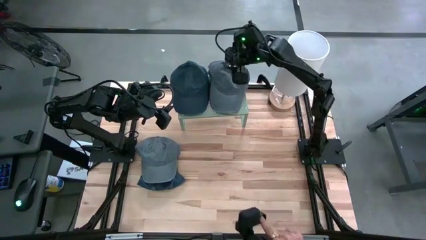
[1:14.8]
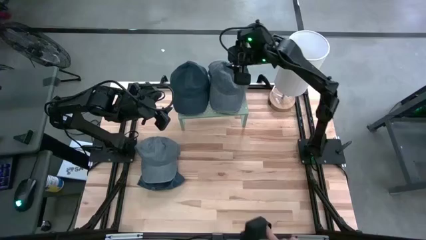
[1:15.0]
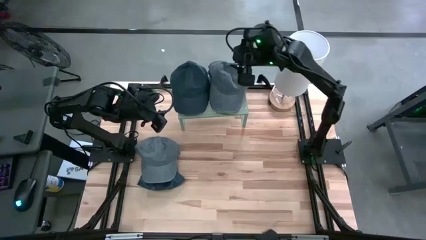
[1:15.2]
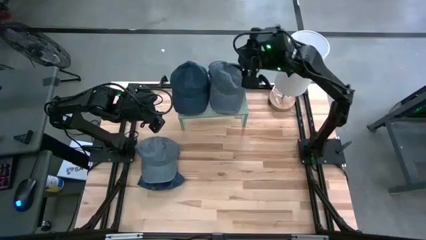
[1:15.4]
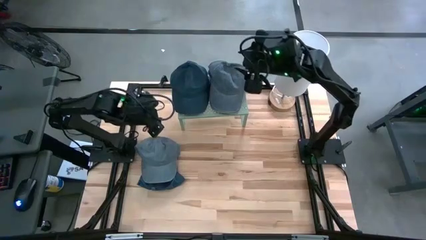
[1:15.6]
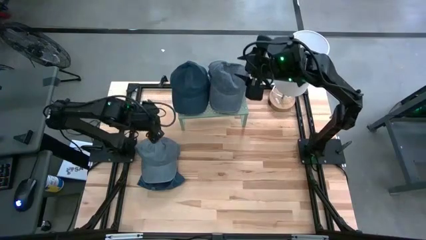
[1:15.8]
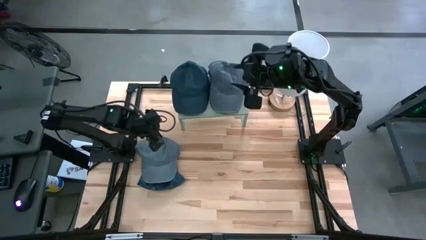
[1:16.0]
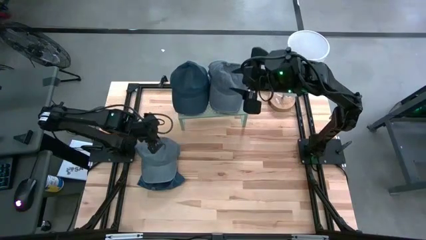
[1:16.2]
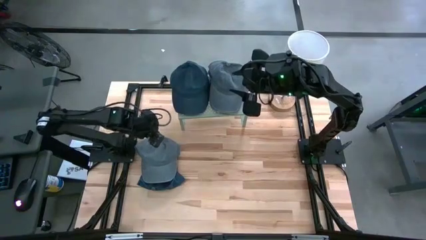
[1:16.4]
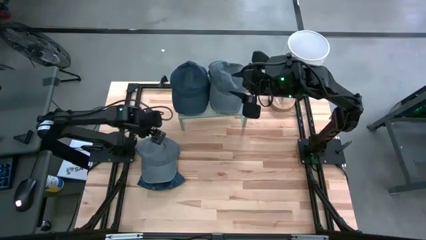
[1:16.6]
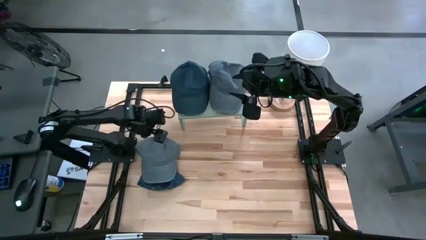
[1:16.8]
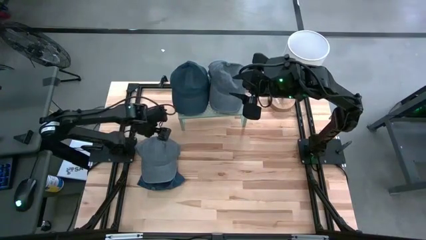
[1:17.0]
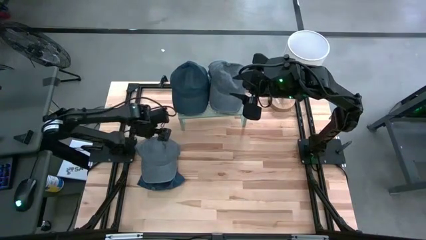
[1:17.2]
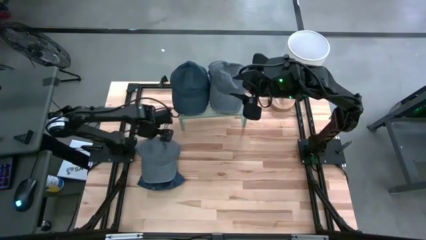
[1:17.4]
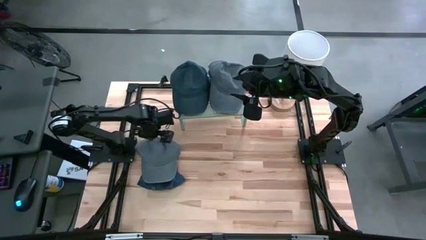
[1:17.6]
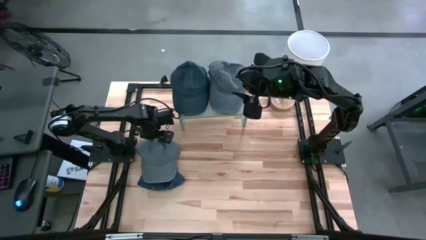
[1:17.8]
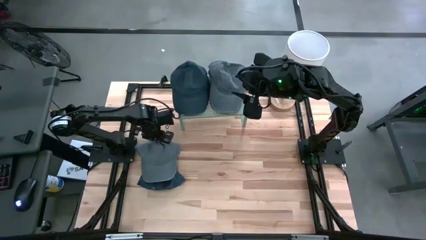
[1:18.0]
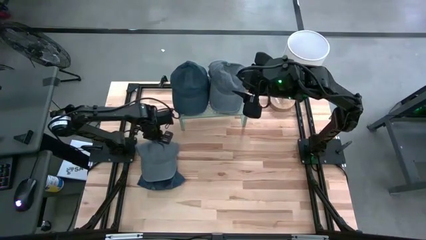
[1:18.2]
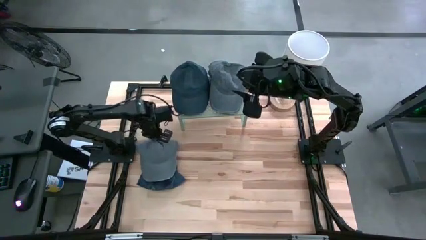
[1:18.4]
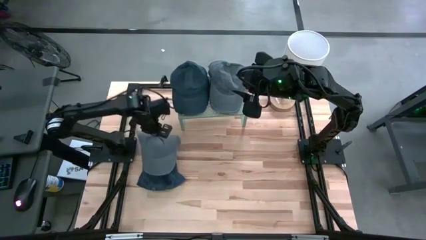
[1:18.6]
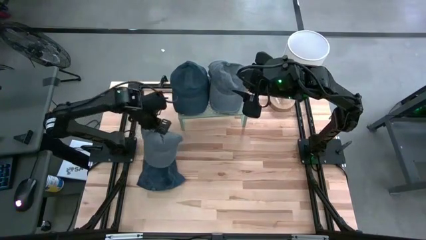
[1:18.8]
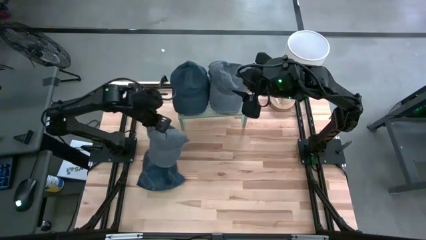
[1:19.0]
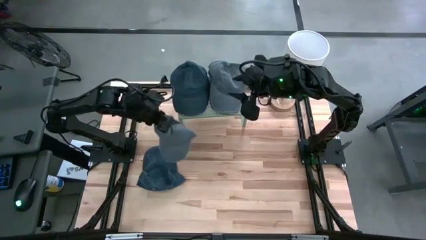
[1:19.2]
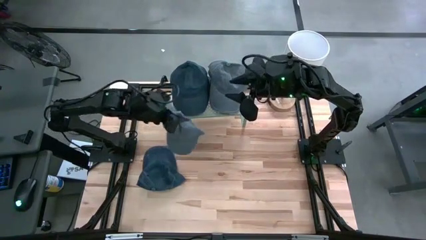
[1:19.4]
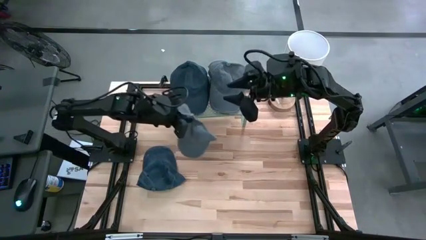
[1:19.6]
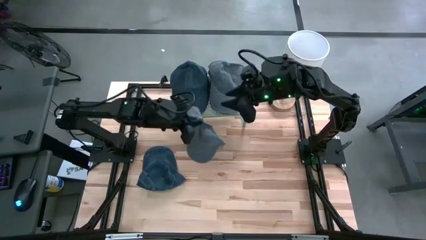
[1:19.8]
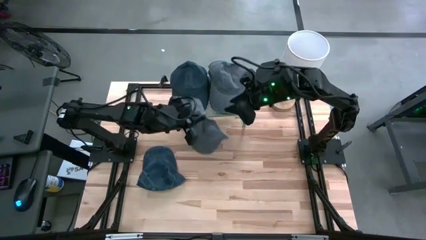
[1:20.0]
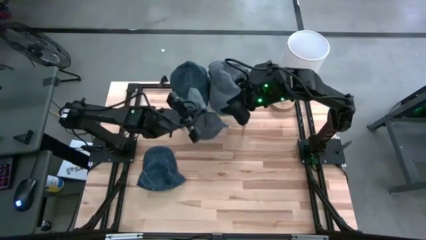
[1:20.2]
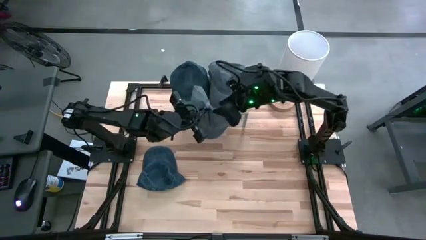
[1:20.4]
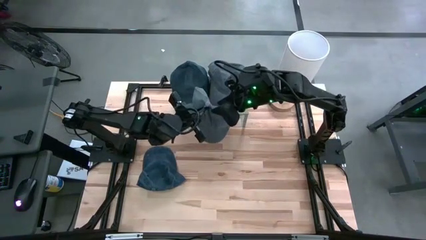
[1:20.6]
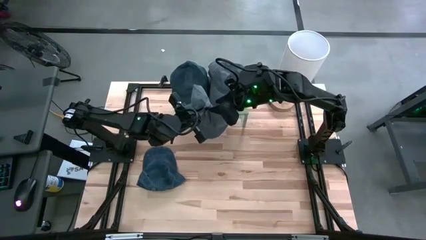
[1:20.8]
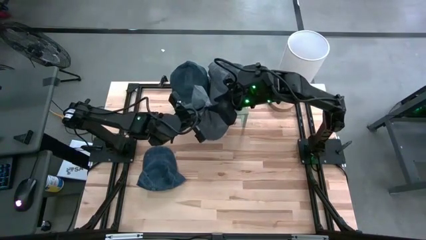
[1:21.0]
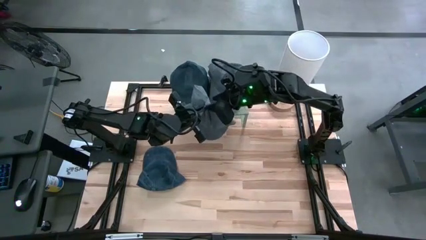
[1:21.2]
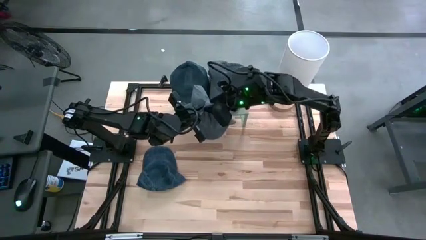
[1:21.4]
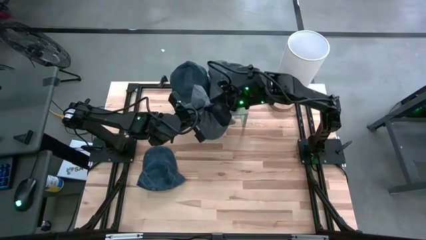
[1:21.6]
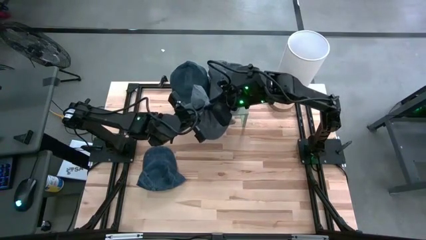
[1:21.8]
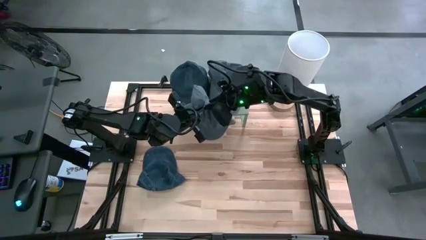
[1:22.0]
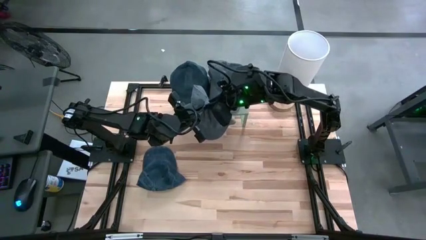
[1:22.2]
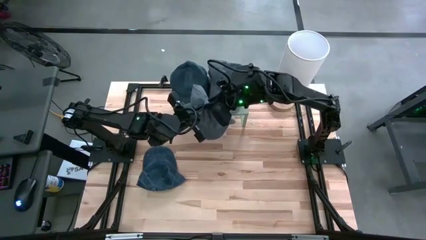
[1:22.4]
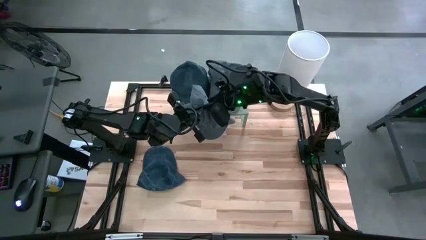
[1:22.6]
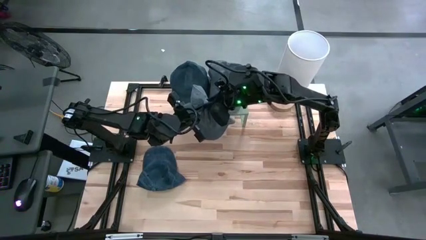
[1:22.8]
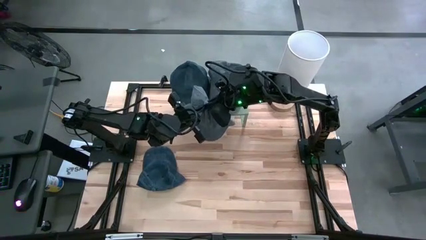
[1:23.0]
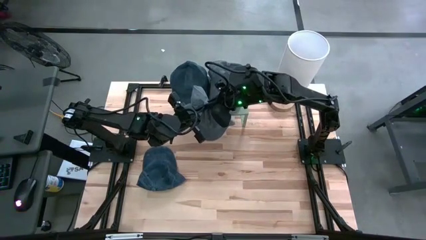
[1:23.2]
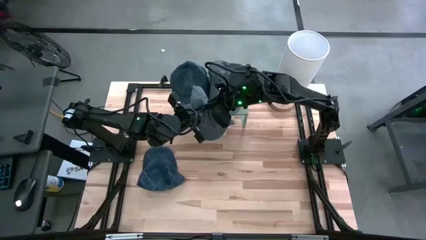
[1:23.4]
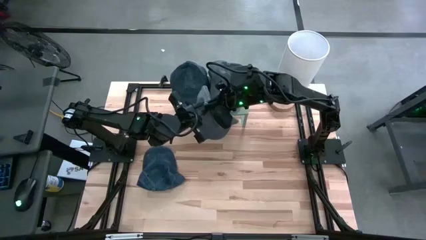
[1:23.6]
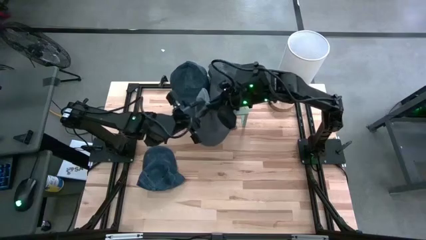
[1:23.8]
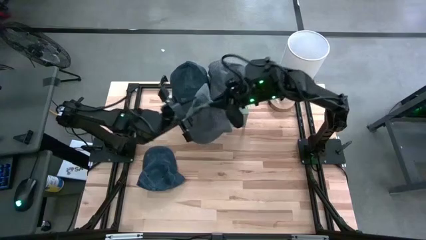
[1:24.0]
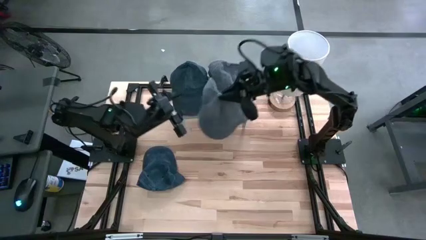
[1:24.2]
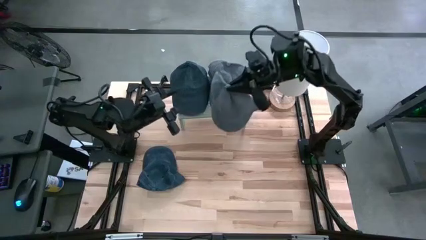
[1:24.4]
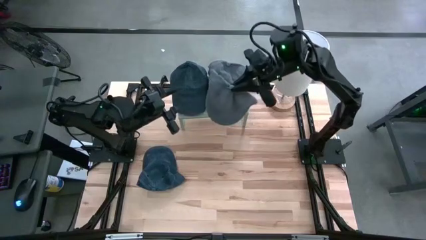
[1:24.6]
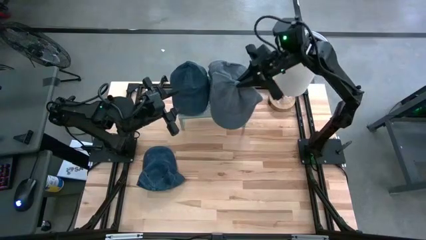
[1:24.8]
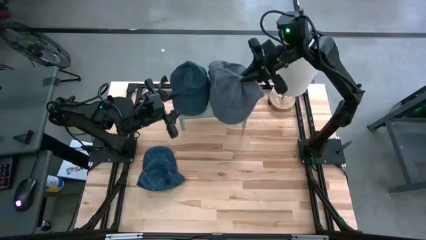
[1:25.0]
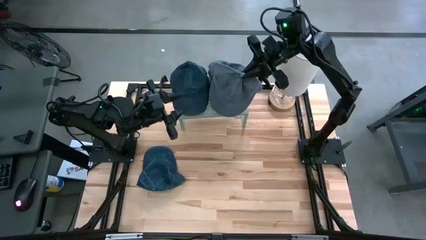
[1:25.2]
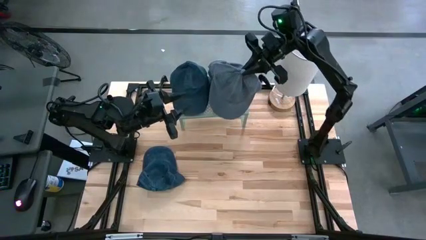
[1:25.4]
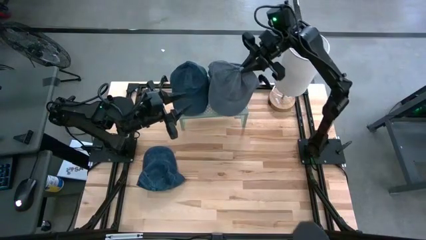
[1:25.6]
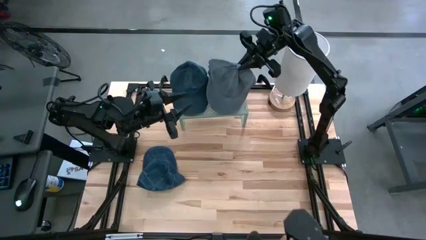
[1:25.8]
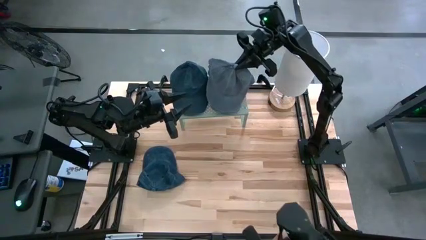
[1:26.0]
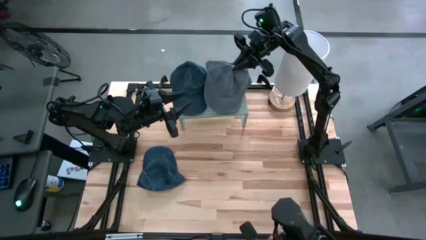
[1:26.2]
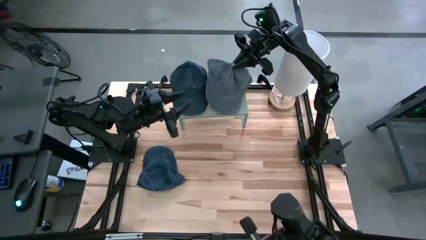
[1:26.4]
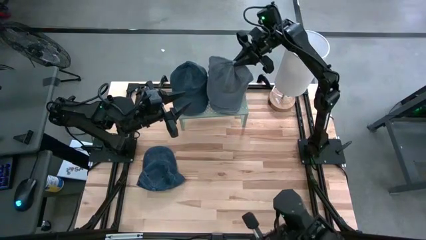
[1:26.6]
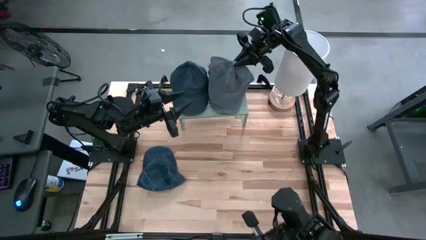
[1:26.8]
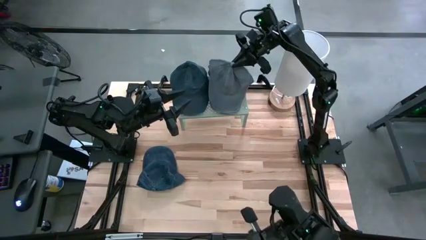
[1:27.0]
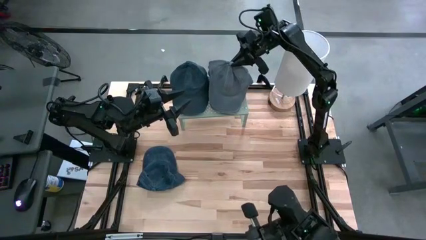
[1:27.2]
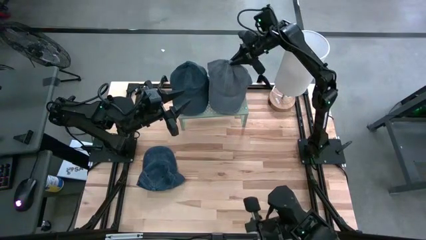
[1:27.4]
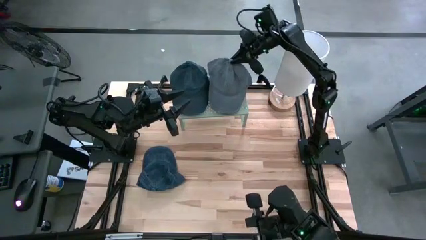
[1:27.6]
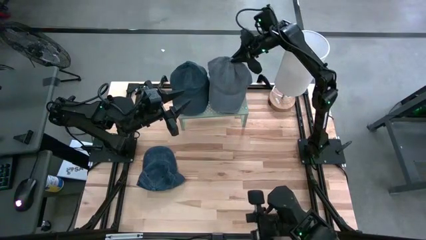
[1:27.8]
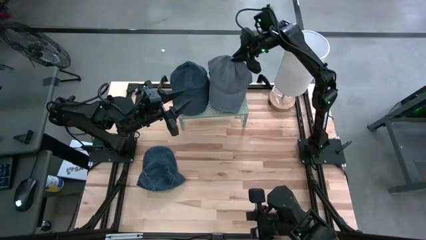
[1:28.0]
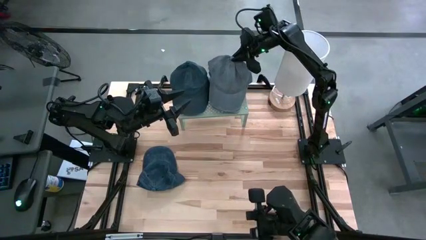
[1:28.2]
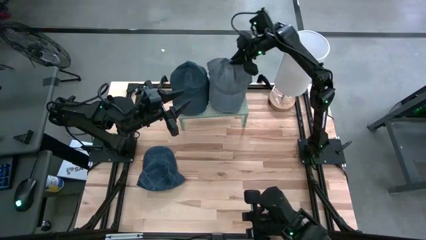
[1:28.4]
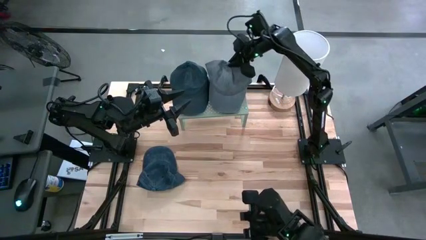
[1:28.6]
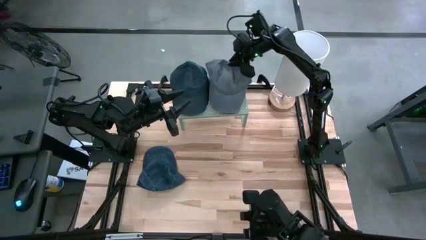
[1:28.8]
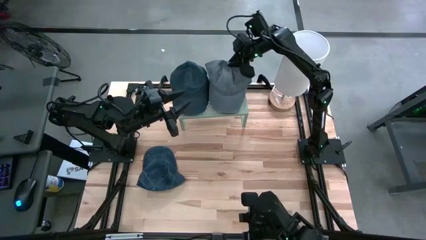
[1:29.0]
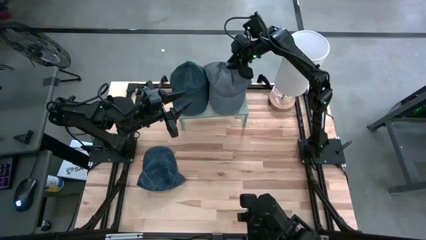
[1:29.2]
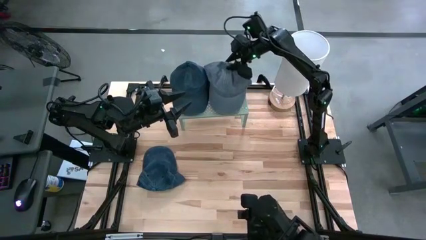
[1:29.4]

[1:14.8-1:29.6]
Task: Pick & Place hat
Stack the gray cap on the gray cap on the shelf

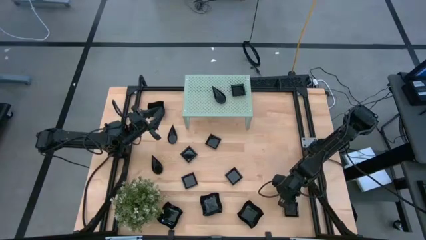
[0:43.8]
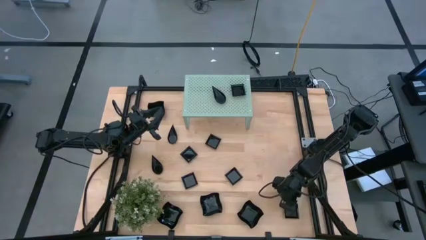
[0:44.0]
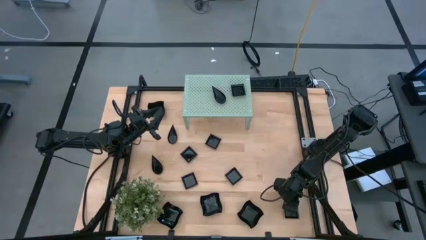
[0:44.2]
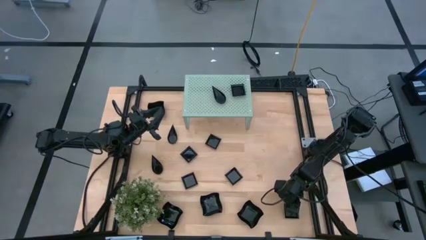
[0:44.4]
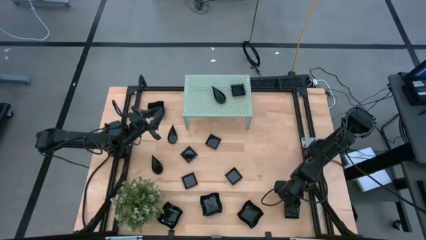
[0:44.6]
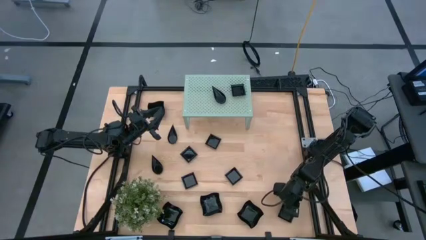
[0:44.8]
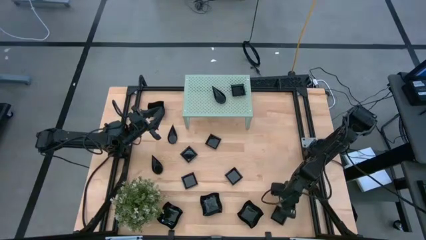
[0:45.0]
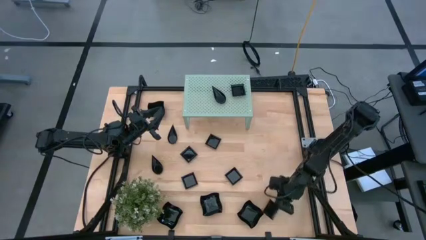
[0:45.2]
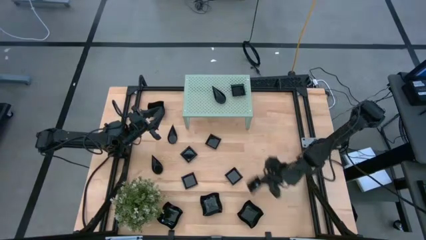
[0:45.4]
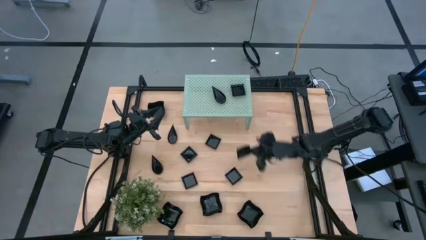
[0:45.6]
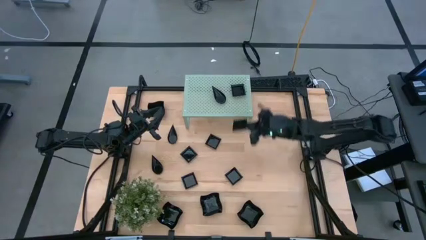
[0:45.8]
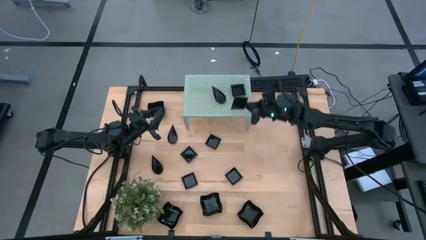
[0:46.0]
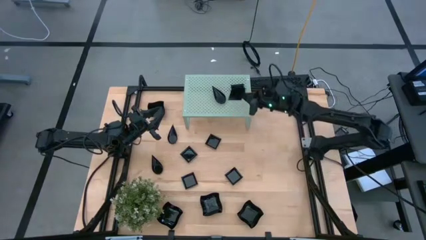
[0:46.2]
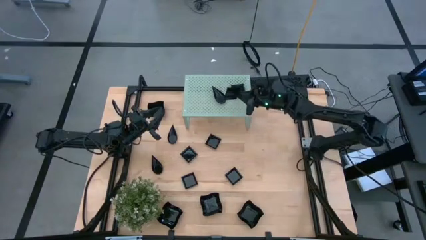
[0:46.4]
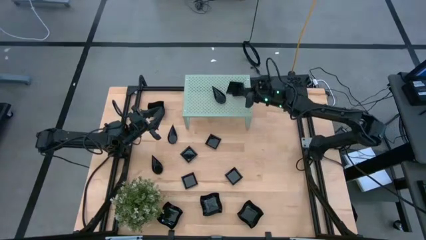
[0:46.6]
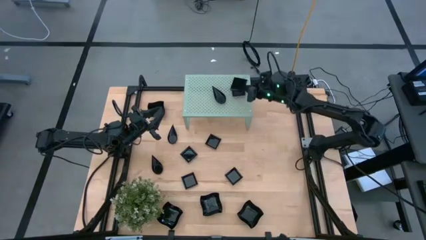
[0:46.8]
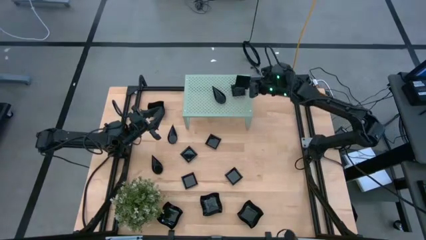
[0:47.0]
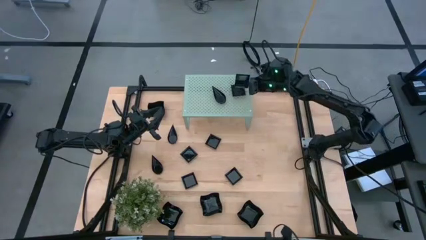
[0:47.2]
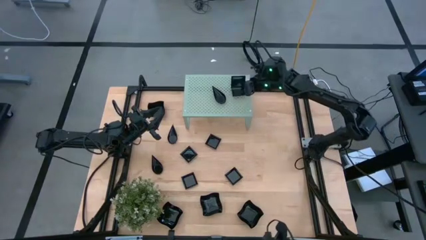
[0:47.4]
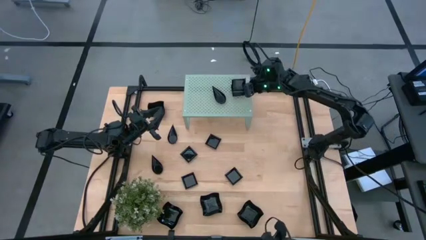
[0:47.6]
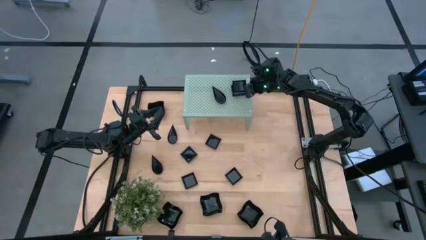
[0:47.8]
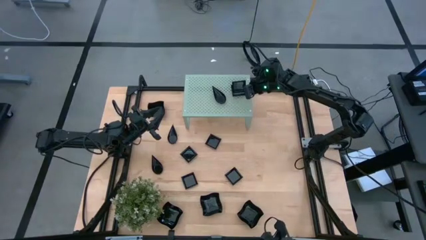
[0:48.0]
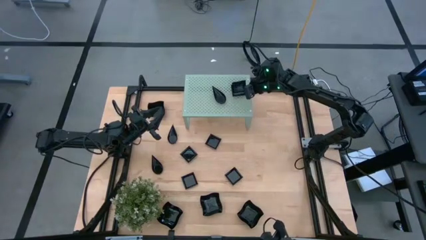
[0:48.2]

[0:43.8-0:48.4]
Task: Pick & Place Mini shaped plates
Stack the black square plate on the shelf
